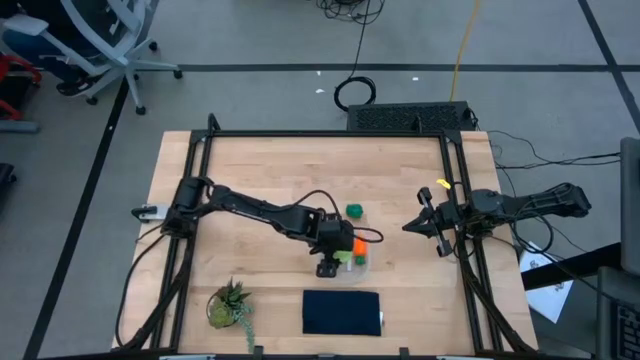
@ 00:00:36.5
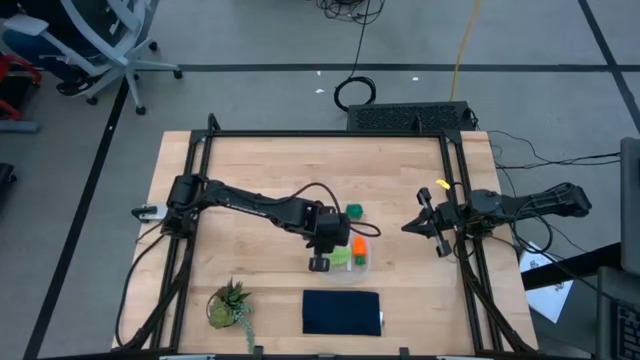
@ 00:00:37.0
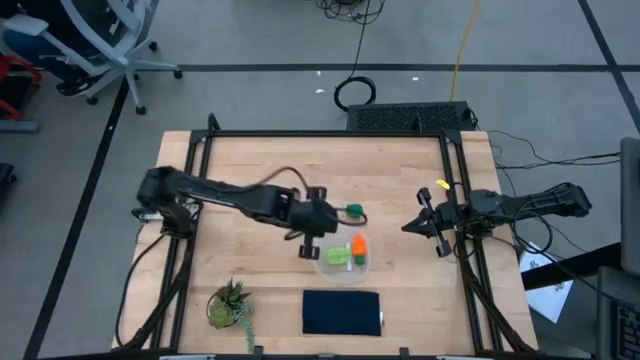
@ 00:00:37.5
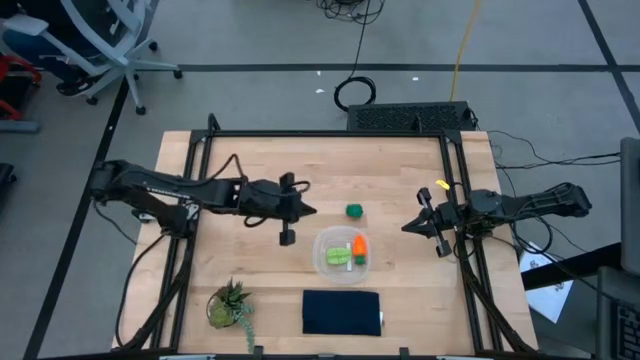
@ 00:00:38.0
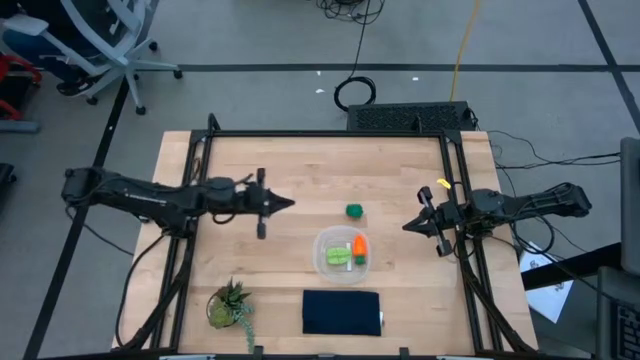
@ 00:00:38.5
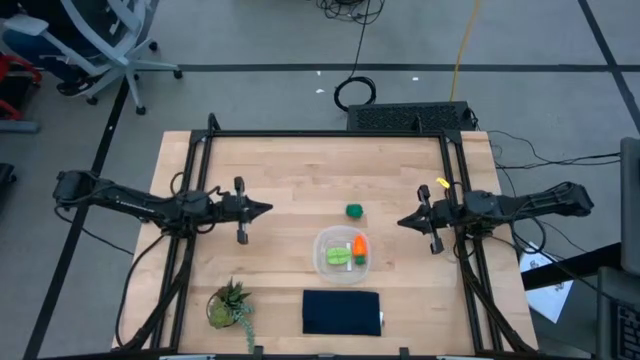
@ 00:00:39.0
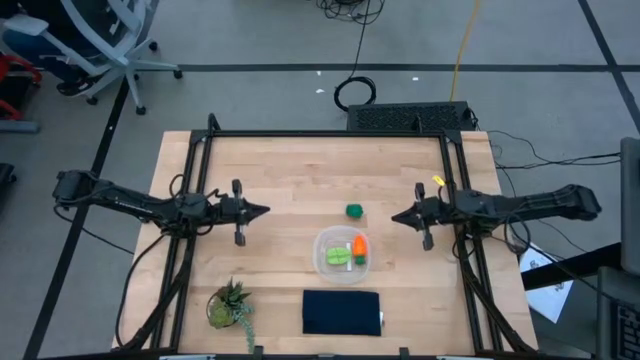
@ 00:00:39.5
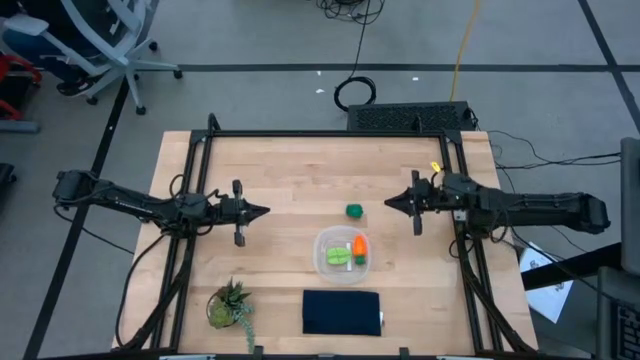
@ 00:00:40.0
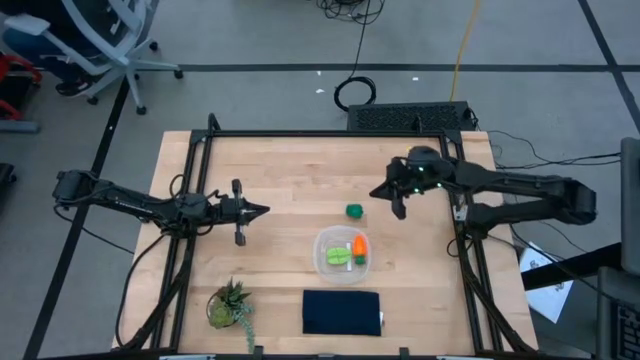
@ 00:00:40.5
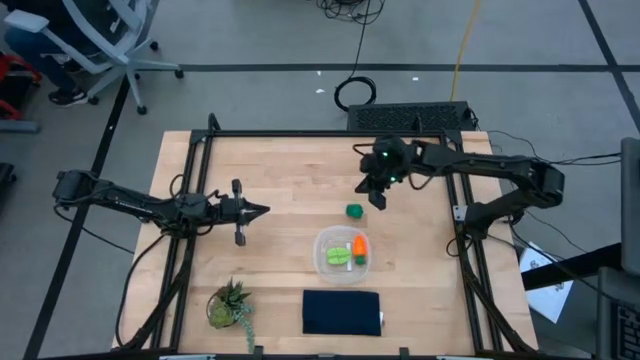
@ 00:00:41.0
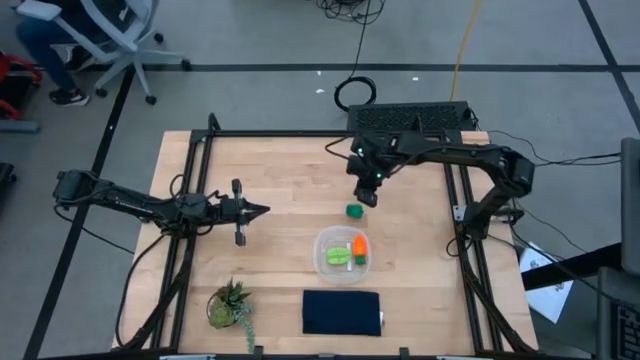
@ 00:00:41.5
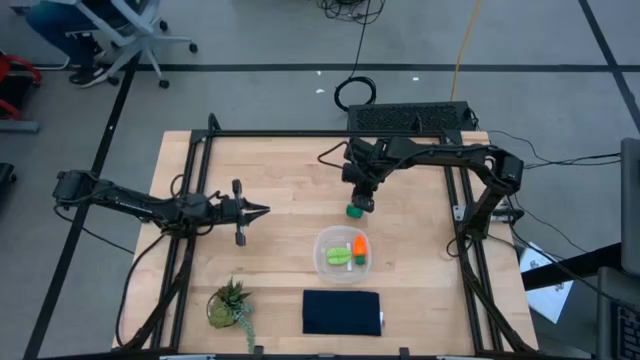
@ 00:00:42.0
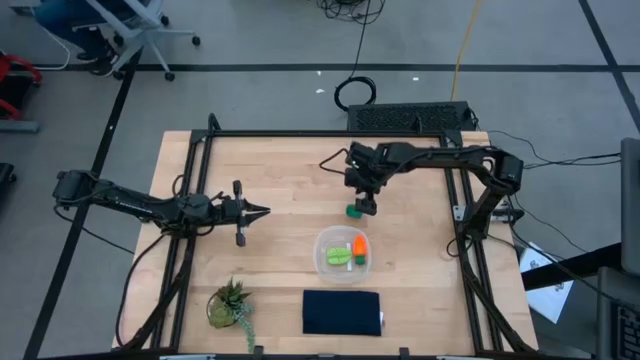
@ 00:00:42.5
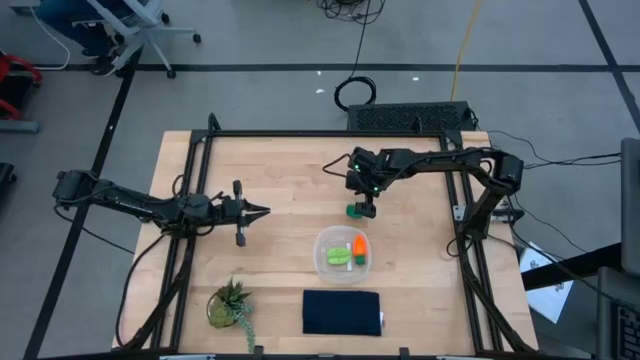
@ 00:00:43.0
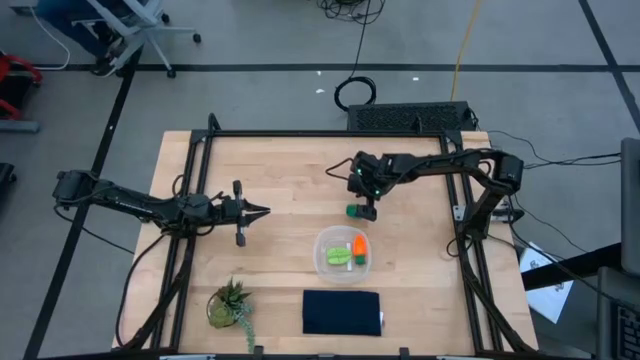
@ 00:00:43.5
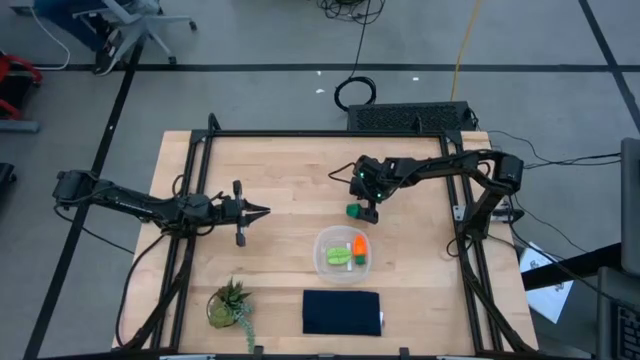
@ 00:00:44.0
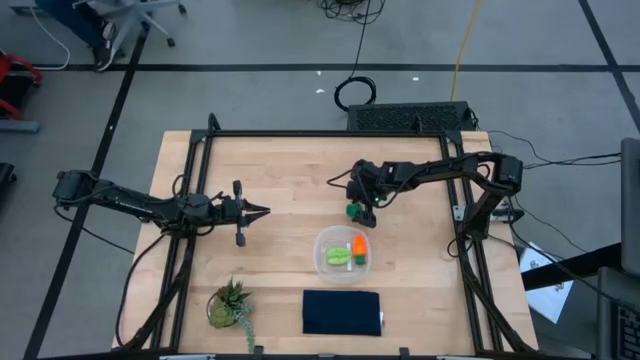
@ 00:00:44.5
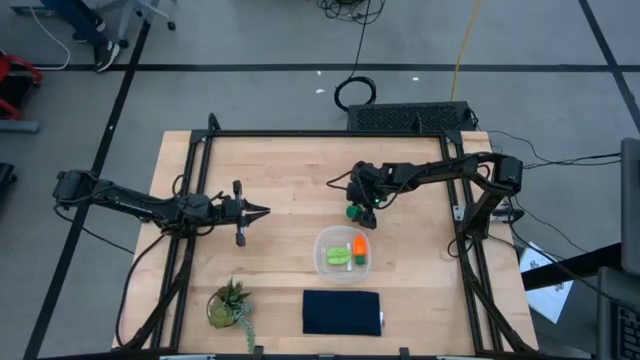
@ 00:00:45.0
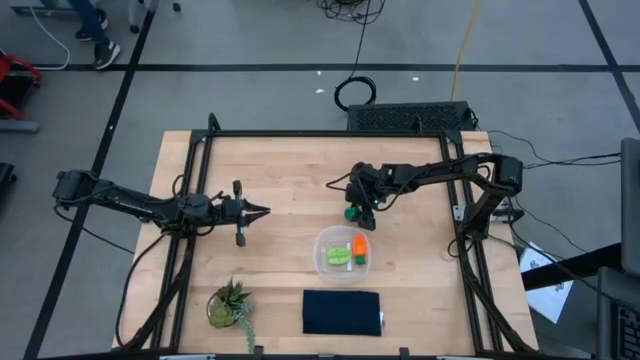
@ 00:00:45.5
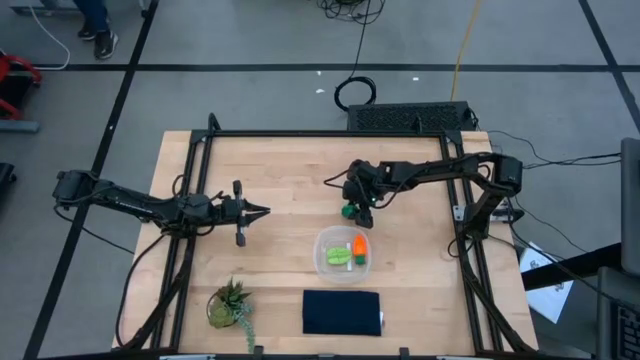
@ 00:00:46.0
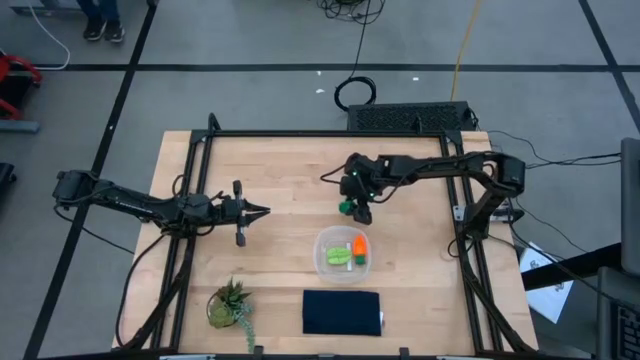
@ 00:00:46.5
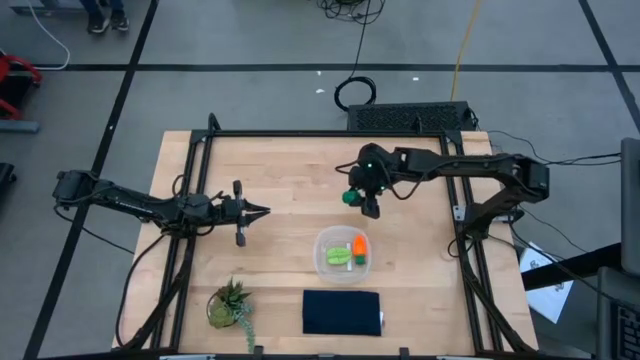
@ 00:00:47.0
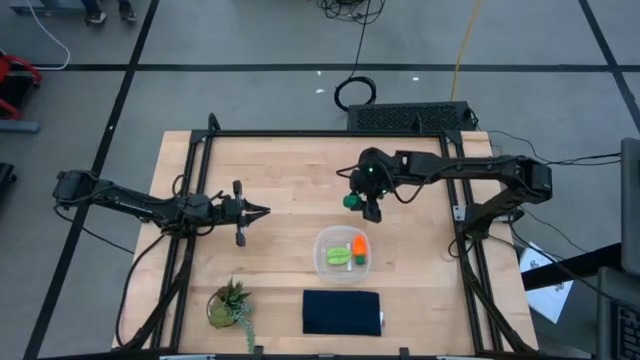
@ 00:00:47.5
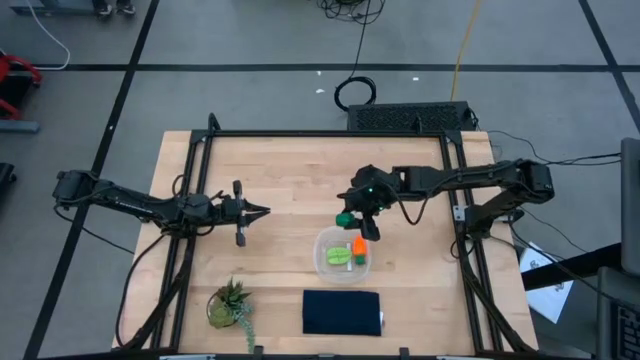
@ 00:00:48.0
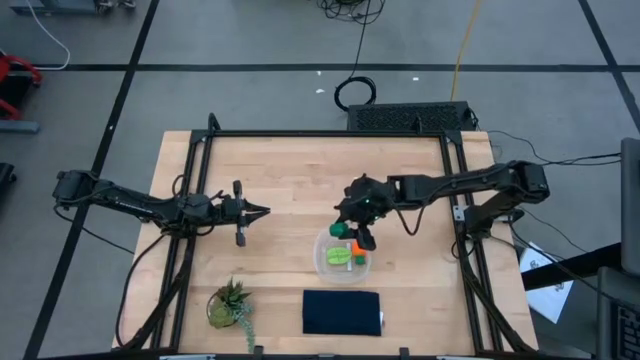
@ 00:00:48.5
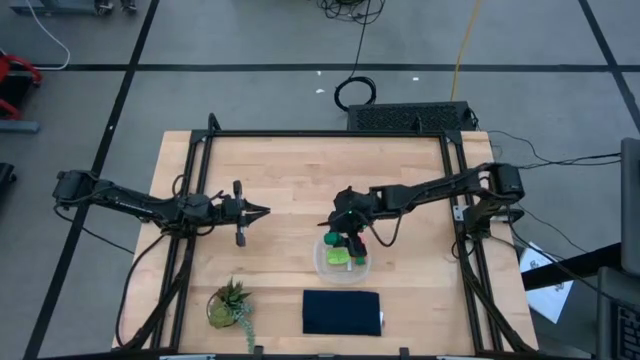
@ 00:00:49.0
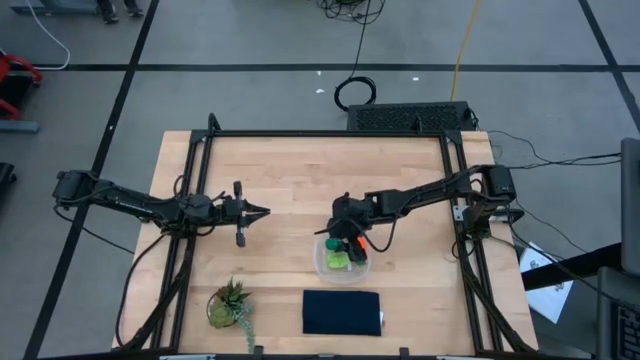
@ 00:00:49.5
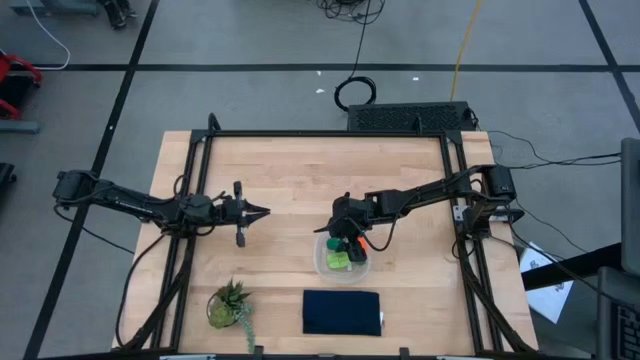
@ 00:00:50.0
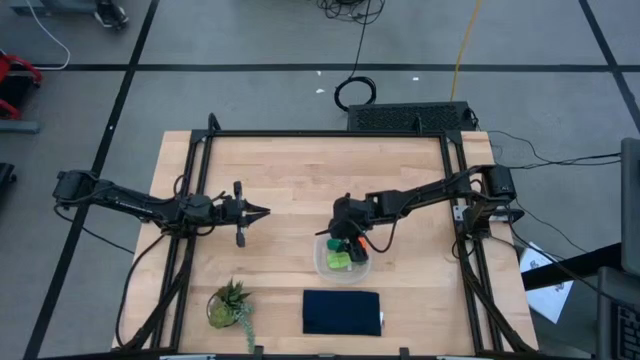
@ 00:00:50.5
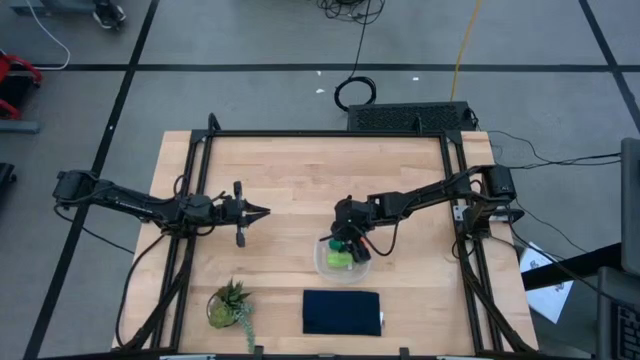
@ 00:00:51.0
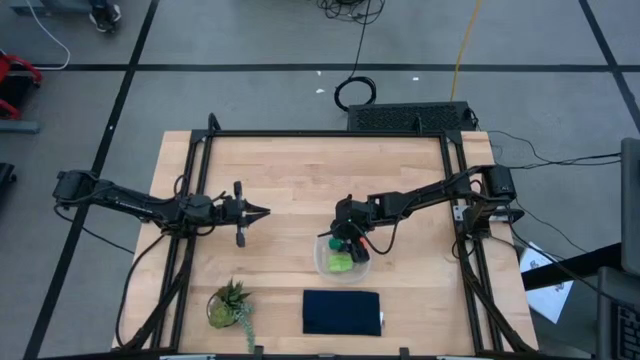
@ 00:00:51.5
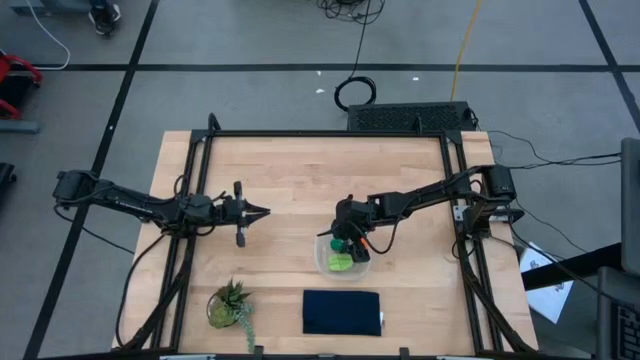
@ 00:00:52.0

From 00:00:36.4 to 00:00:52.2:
Task: Pick and placing Produce into tupperware
Put the green bell pepper into the transparent bin

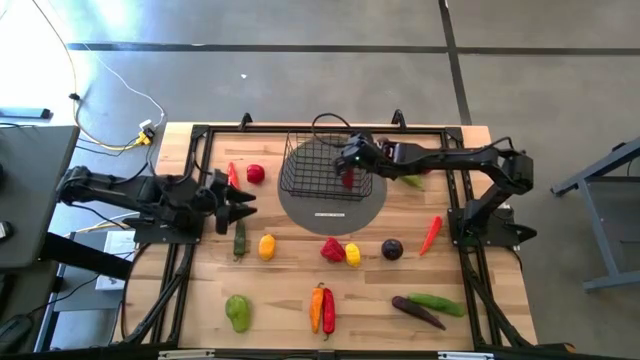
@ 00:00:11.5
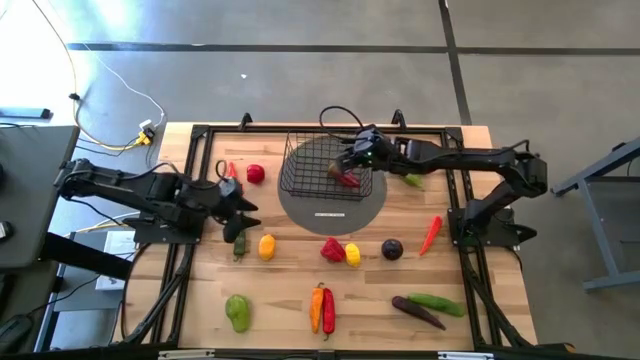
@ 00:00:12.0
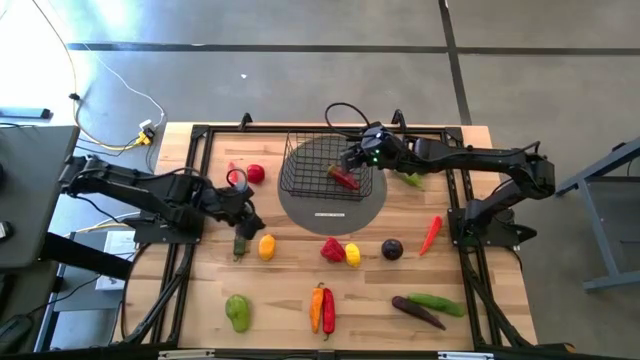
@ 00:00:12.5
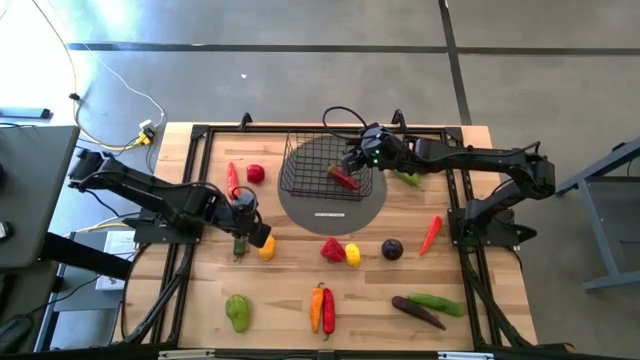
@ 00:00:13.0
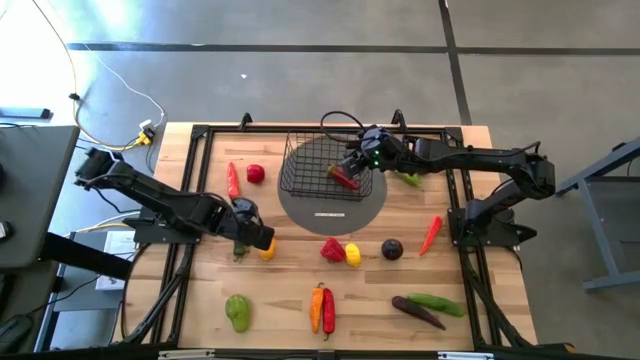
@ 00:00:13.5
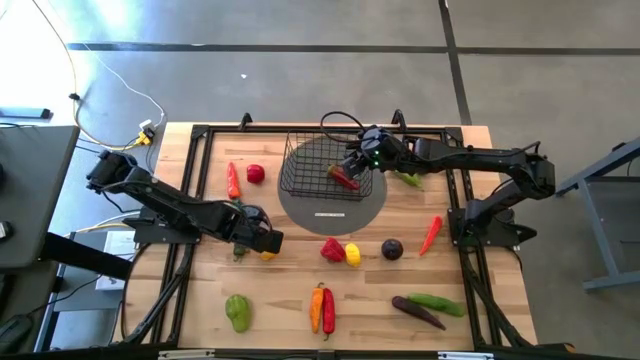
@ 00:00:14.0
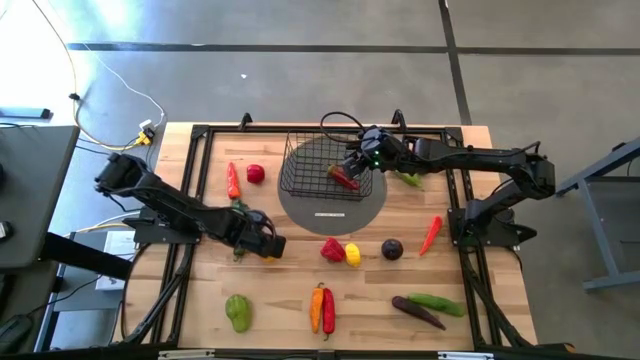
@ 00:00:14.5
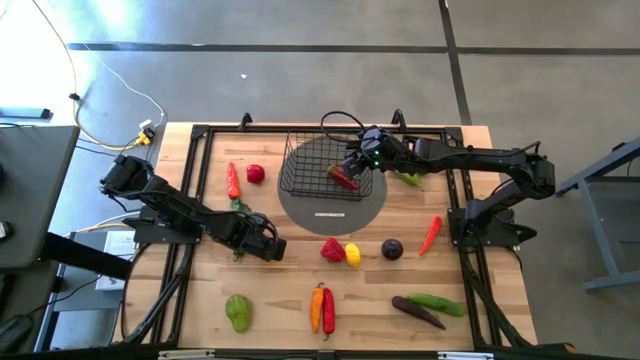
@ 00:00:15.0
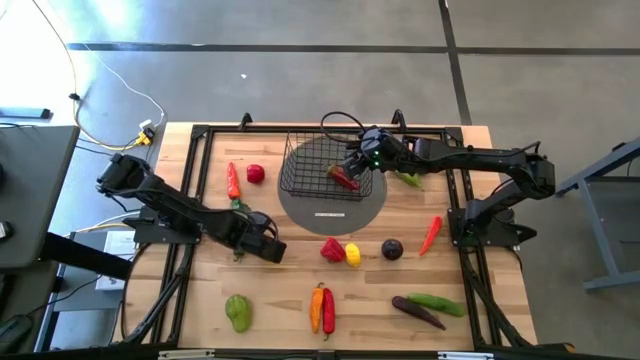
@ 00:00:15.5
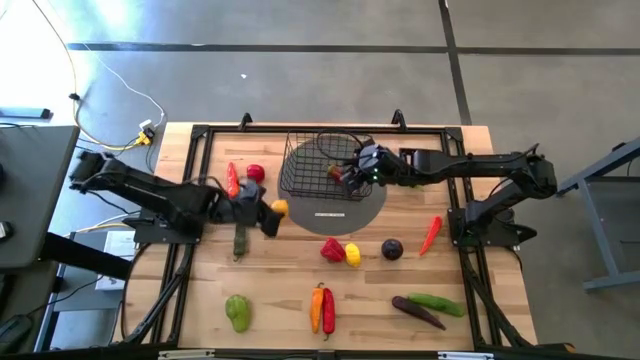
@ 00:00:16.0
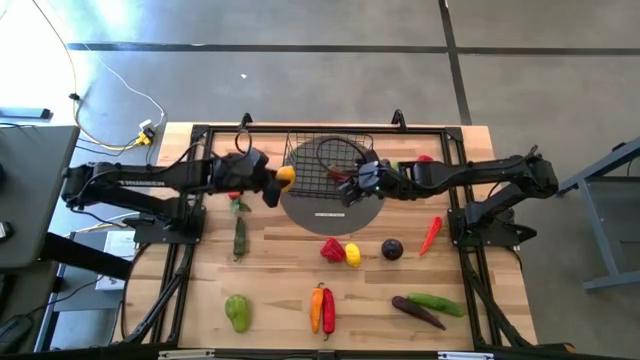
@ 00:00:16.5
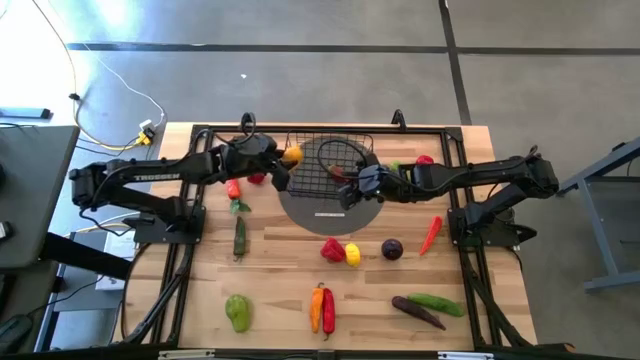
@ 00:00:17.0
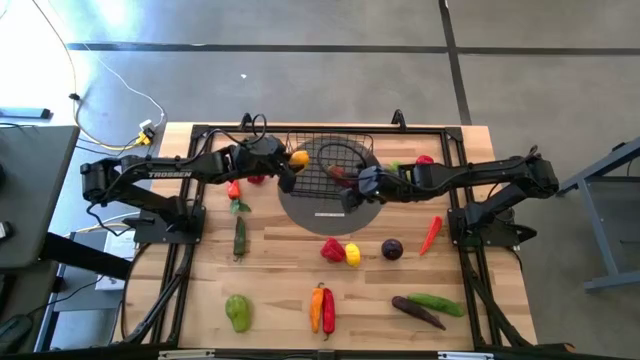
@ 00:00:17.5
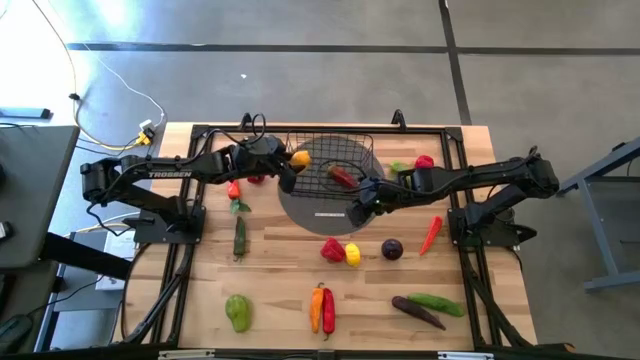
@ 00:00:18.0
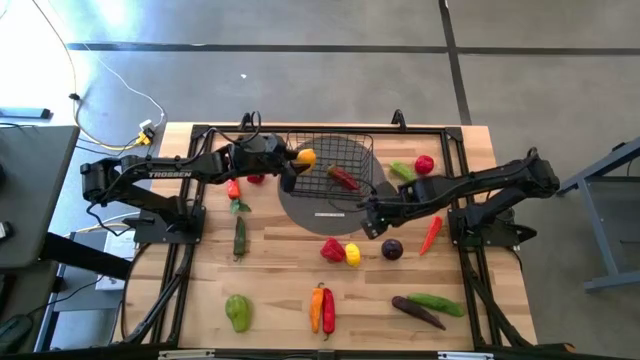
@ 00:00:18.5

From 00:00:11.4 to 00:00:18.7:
Task: Build produce basket
Put the left lemon into the wire basket
